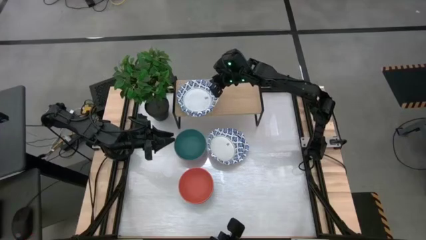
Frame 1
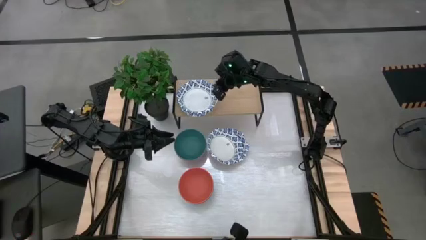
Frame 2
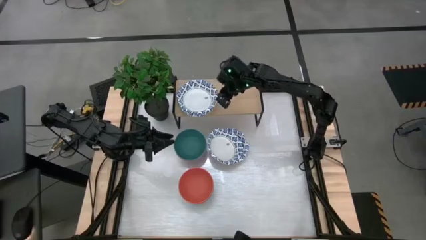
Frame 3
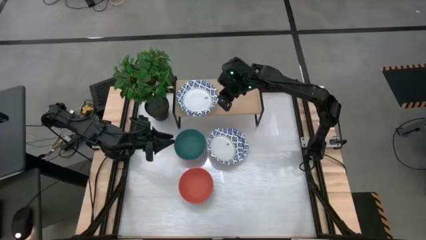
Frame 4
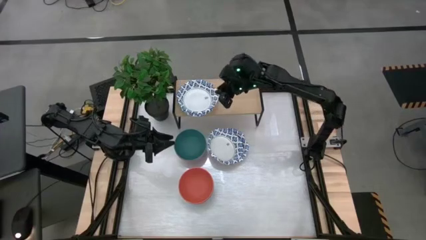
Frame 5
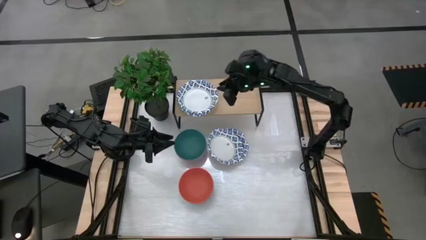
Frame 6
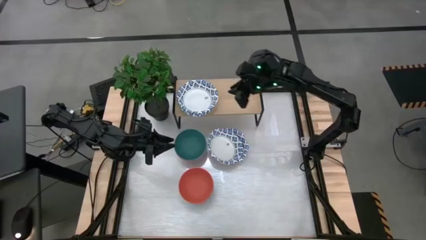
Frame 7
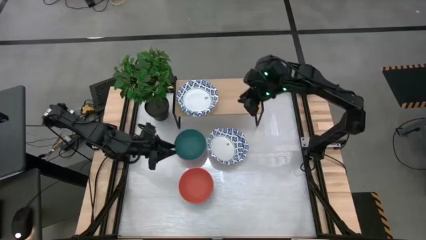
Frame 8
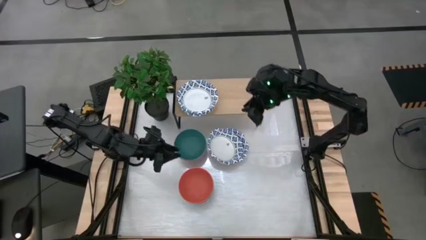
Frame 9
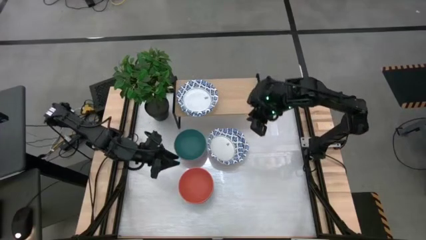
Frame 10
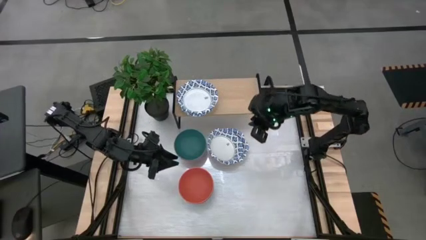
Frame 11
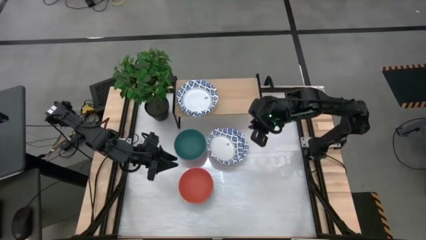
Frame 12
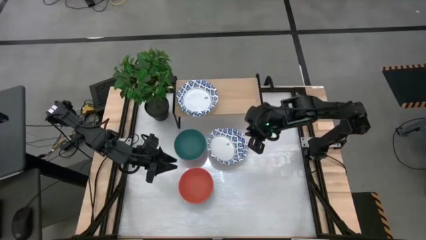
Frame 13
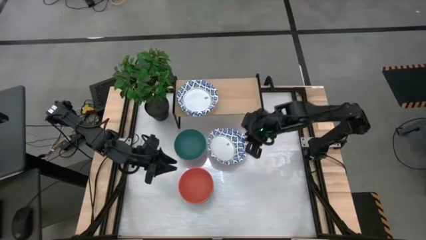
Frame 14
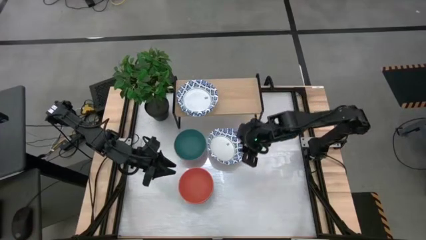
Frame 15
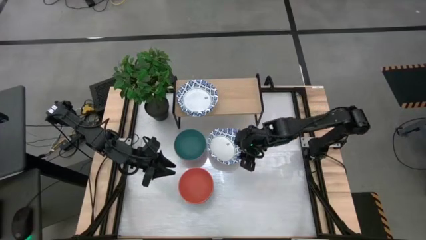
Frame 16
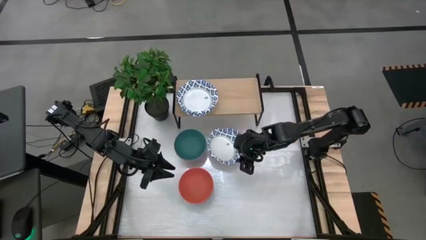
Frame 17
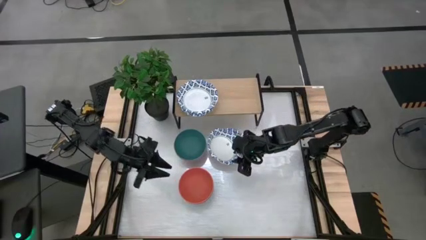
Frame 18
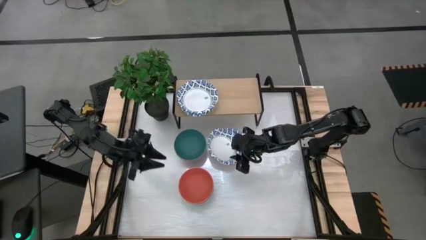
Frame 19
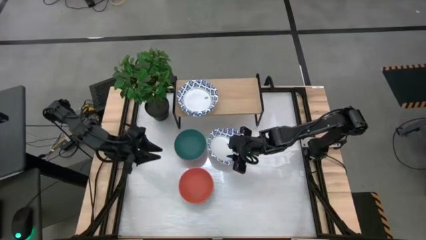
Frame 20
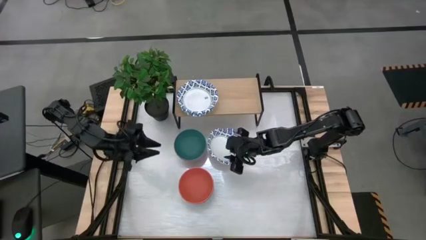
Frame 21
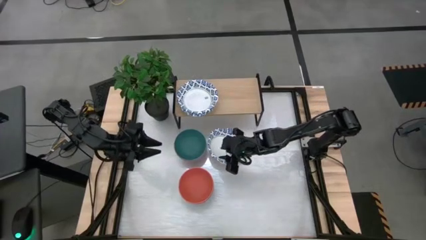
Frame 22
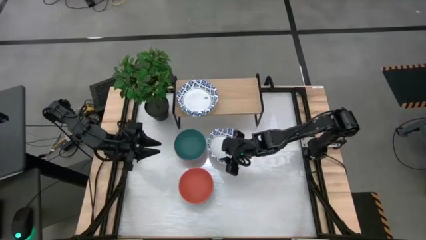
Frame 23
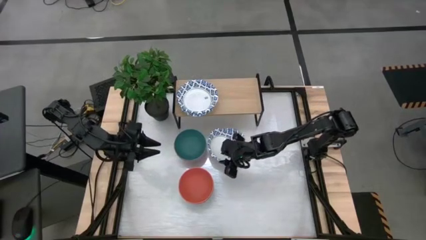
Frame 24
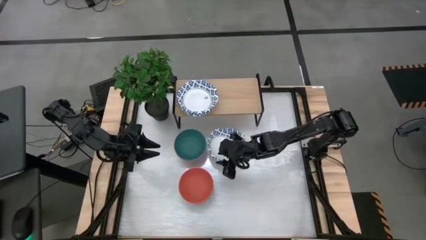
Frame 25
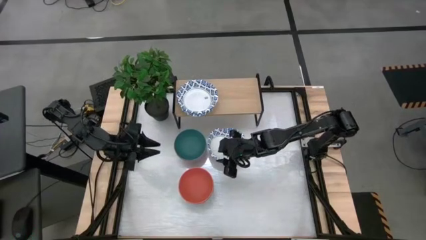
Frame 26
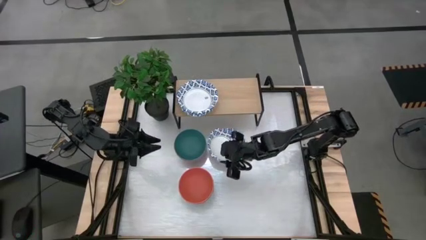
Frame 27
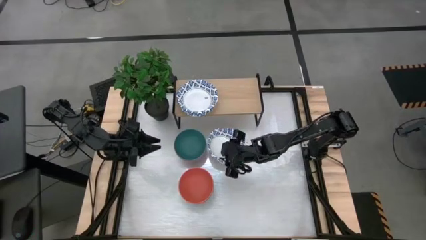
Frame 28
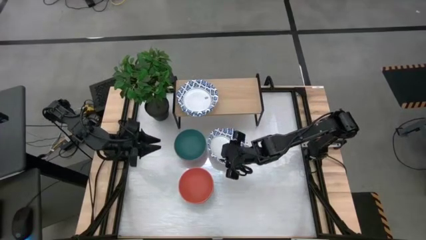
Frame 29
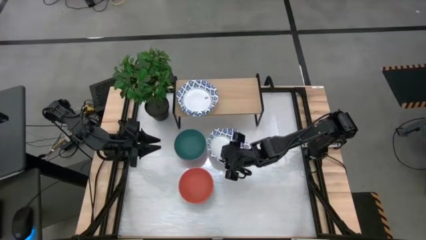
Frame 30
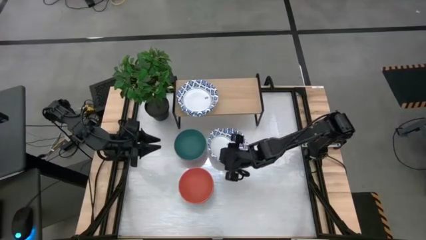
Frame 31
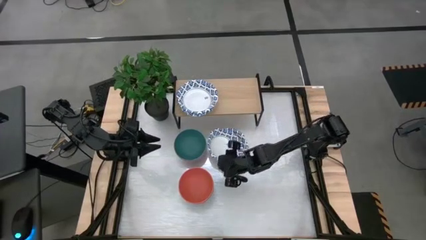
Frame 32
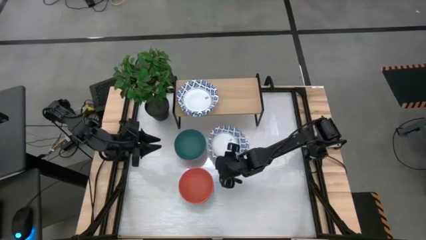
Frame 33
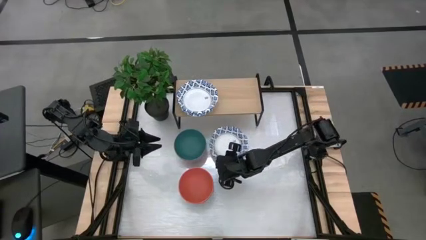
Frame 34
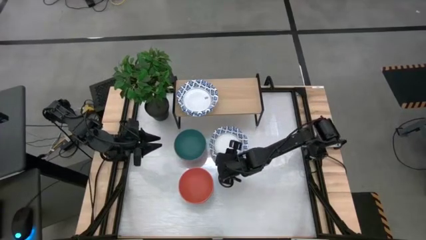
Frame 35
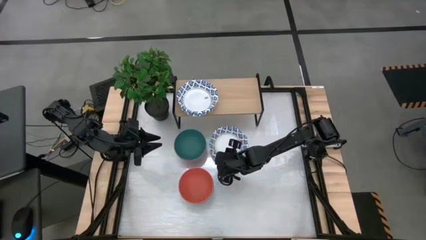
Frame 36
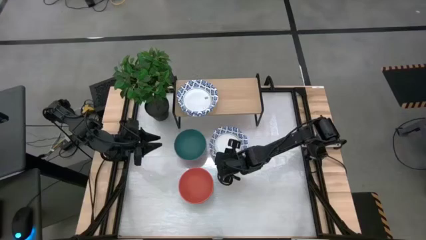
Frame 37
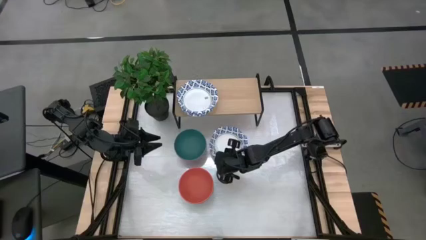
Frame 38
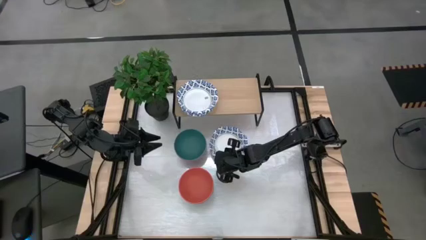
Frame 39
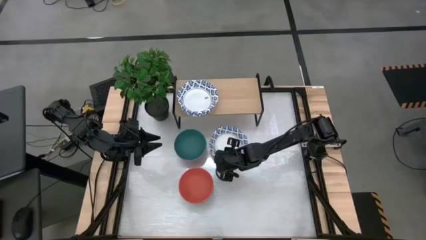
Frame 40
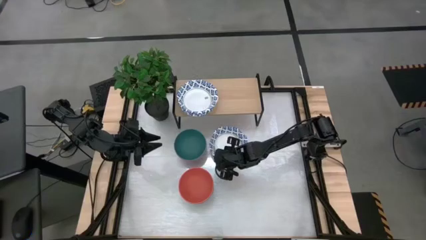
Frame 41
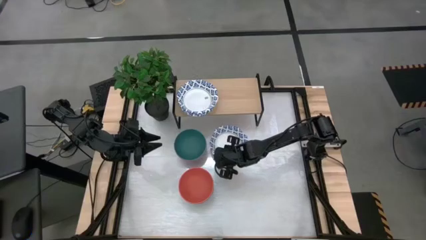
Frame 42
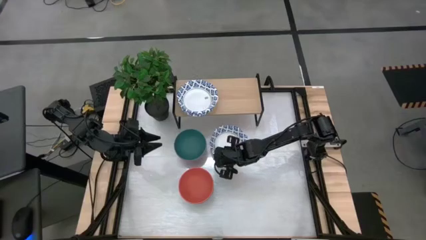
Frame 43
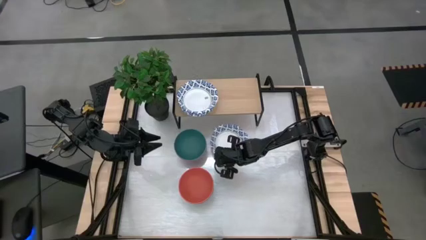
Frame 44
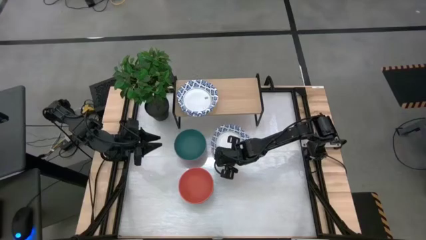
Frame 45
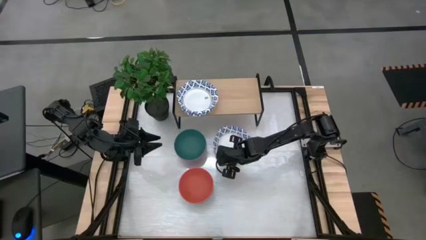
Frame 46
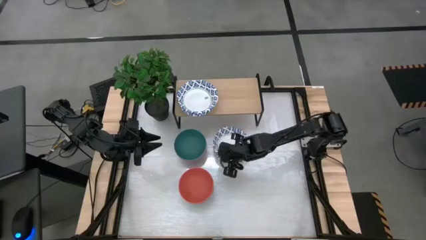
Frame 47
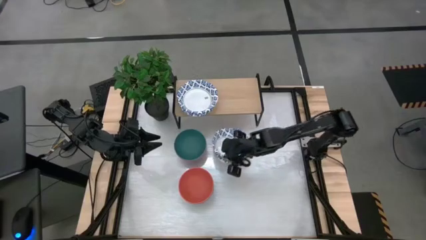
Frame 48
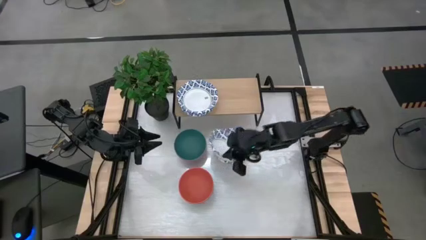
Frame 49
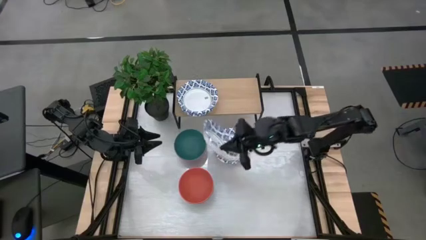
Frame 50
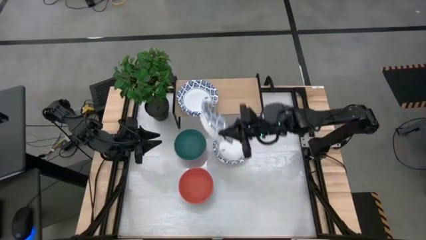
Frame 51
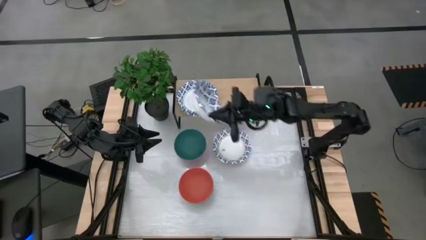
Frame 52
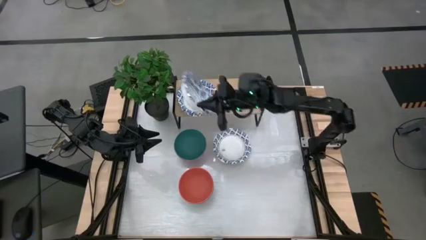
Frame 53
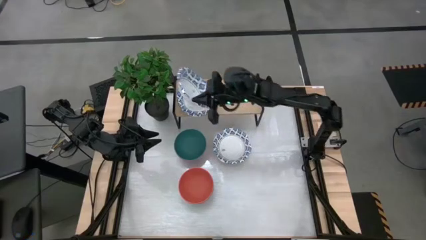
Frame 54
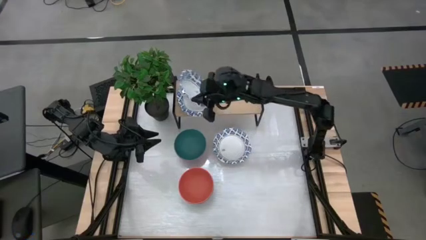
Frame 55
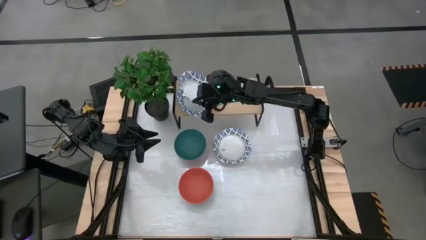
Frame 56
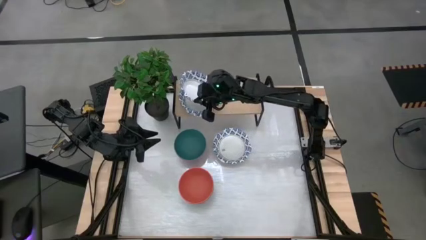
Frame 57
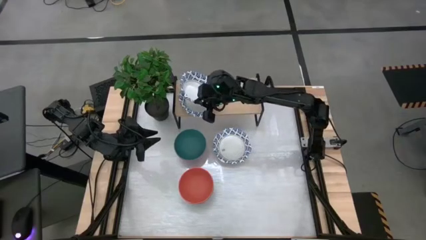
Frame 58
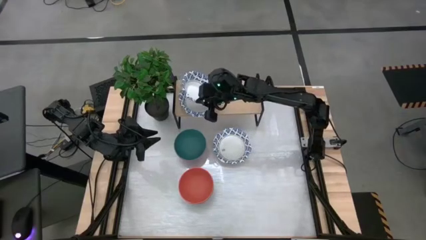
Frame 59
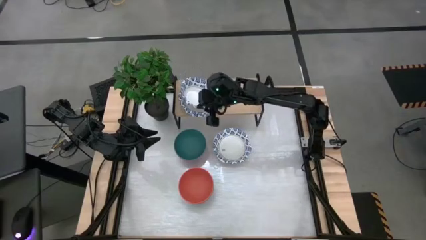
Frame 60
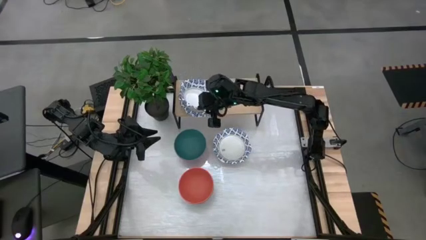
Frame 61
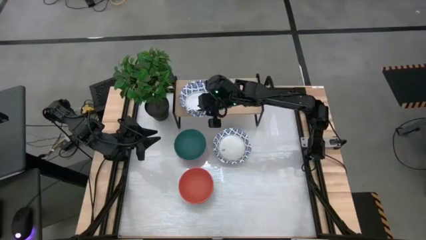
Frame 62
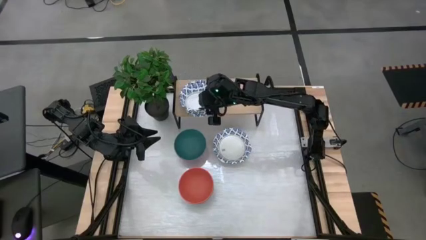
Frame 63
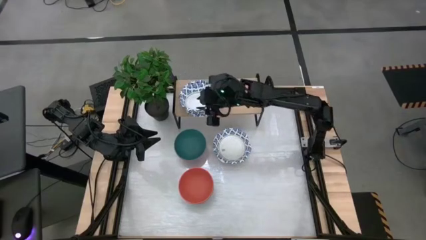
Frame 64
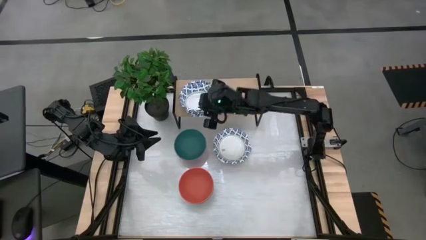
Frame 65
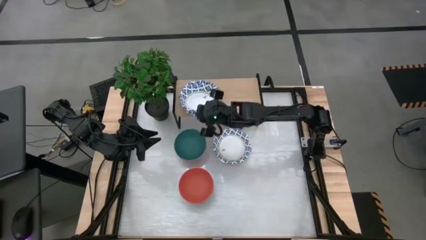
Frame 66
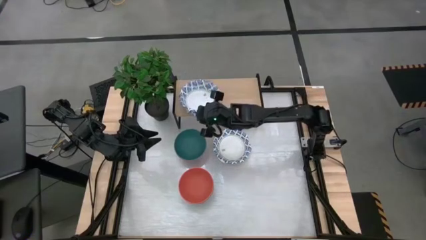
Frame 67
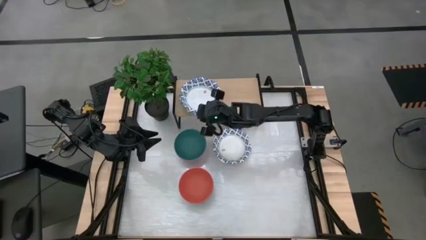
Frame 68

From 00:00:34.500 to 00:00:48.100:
Task: Place and stack bowls onto a shelf
Stack the white bowl on top of the white bowl on the shelf
